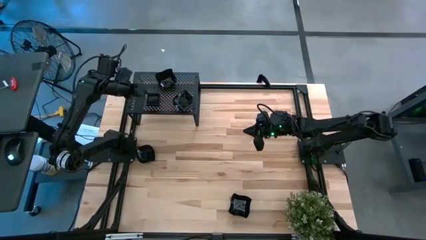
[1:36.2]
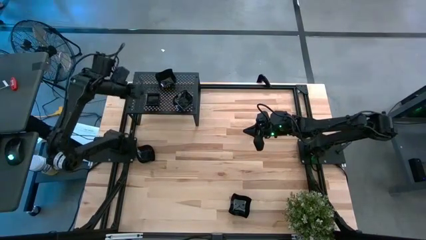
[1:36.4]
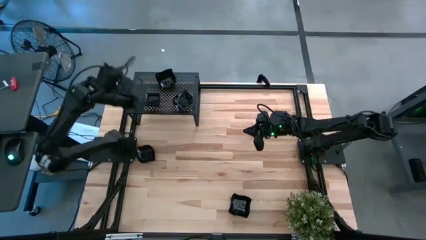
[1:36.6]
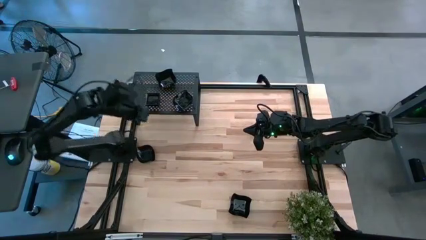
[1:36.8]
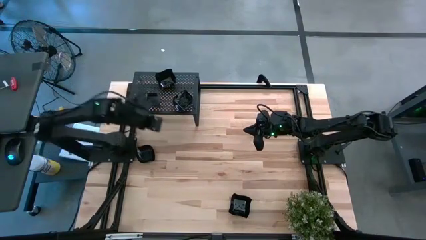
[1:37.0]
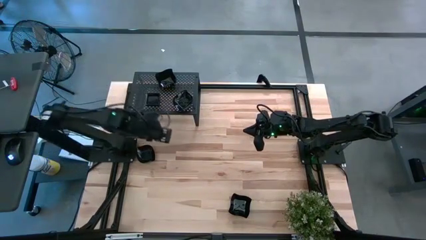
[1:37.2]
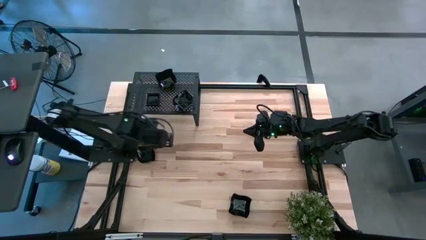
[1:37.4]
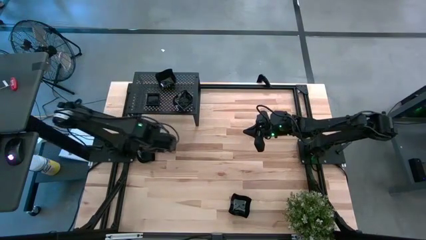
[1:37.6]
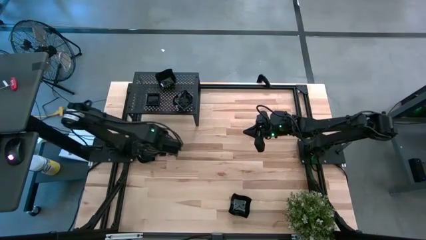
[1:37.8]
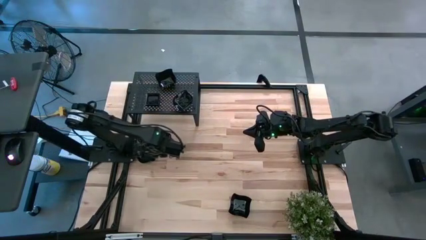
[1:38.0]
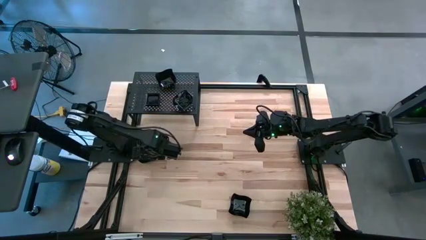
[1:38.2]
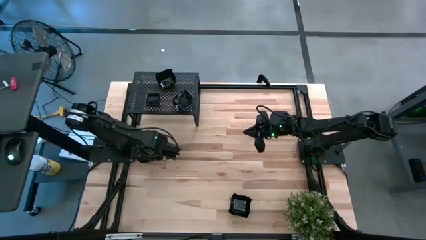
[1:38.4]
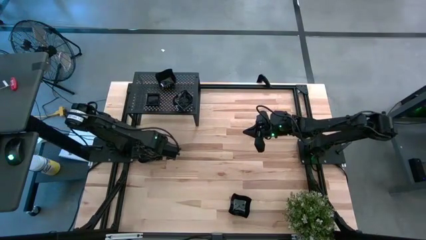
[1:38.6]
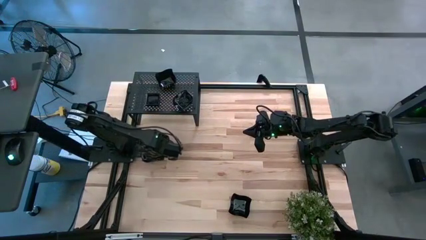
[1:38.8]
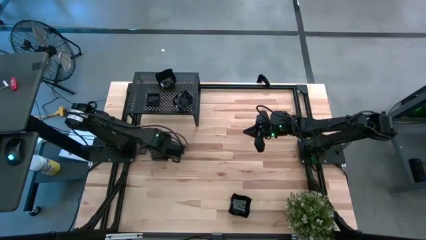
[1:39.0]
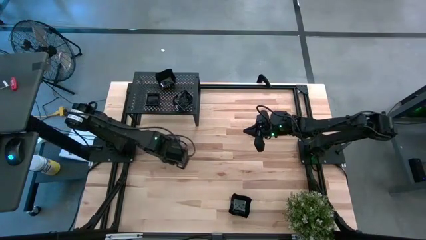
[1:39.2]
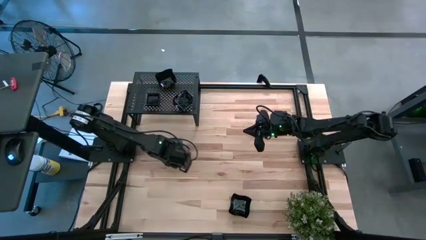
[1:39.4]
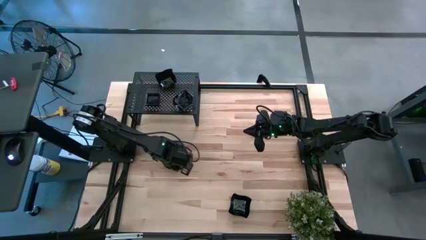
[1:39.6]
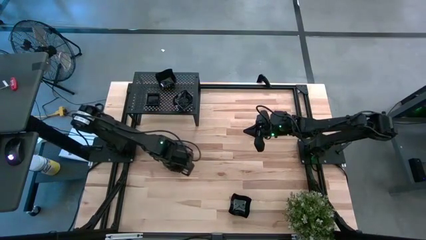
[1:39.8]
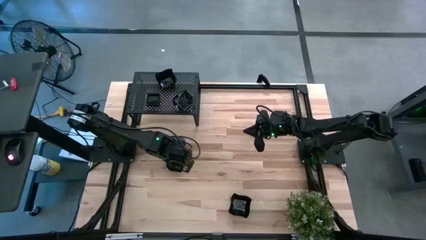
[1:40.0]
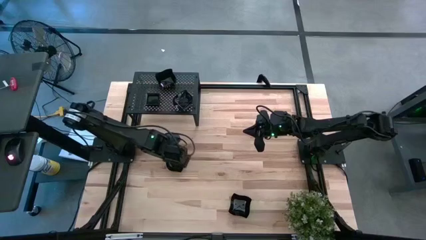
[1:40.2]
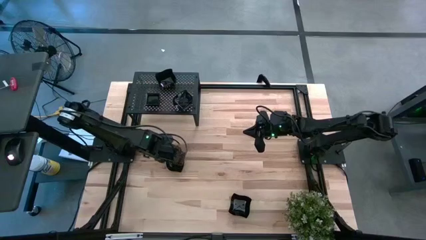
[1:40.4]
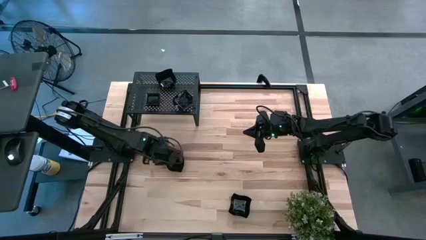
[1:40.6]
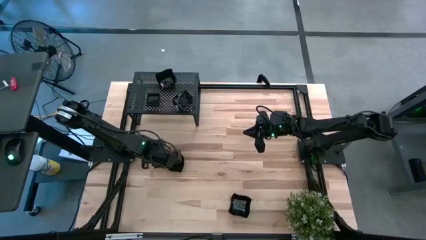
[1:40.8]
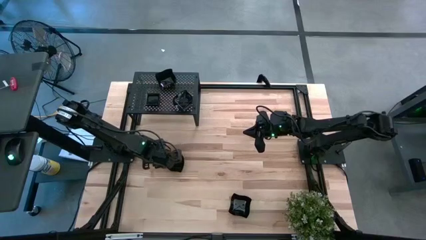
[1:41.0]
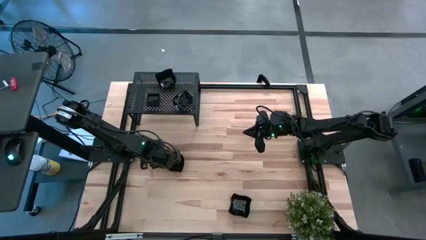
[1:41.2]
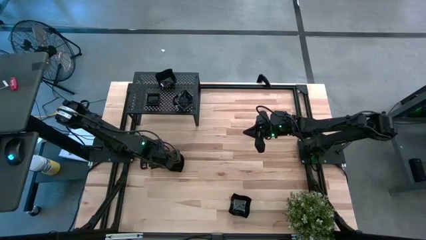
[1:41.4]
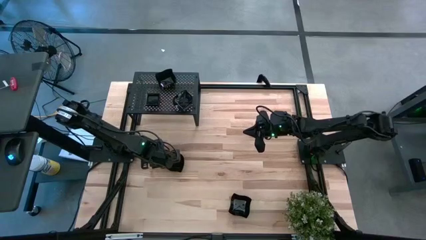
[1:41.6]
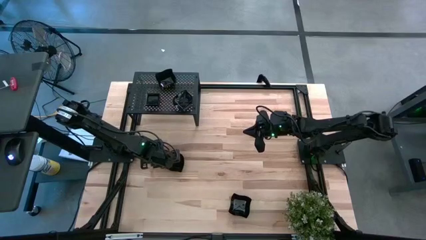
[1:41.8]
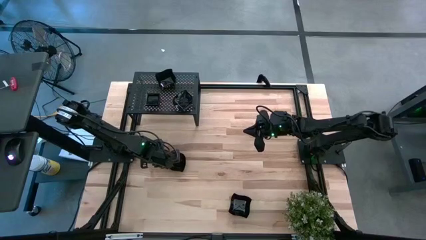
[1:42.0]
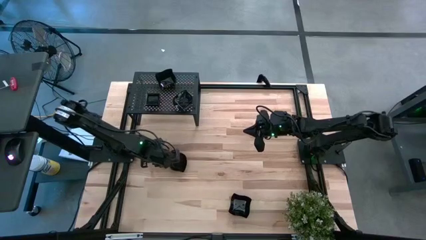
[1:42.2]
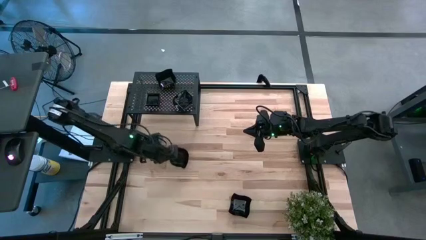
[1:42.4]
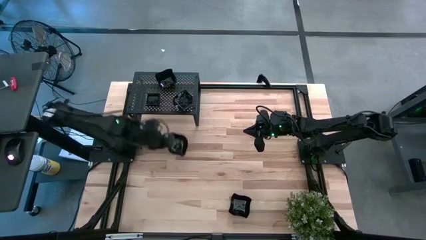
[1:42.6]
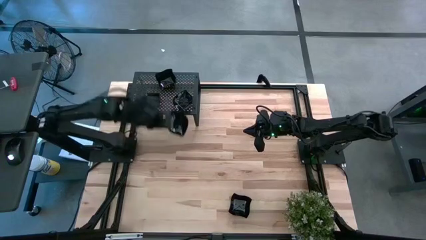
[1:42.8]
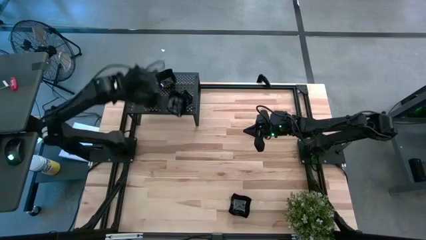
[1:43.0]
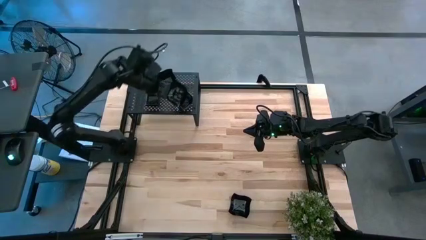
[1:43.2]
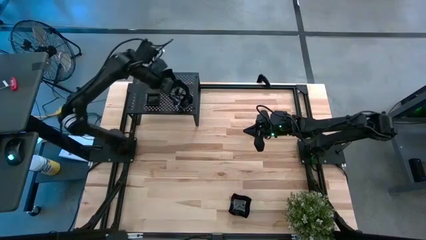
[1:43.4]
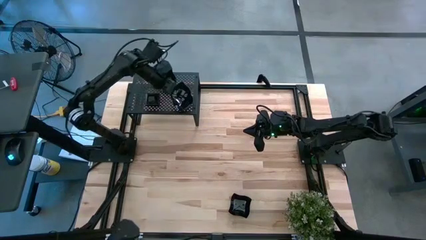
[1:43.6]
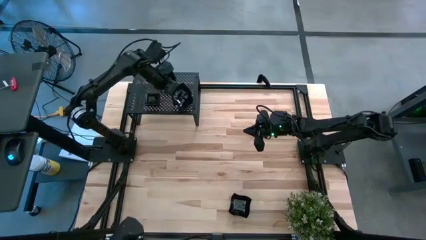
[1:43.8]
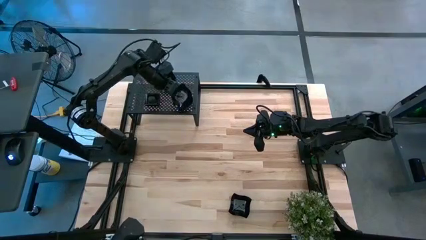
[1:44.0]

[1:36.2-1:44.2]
Task: Pick & Place Mini shaped plates
Stack the black leaf shaped plate on the other black leaf shaped plate on the shelf

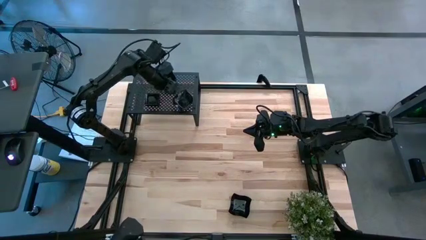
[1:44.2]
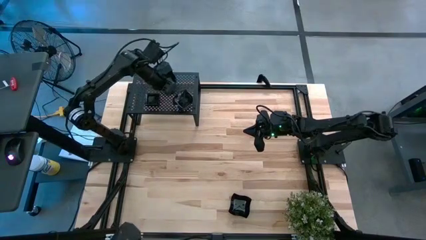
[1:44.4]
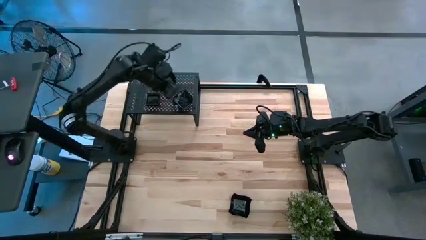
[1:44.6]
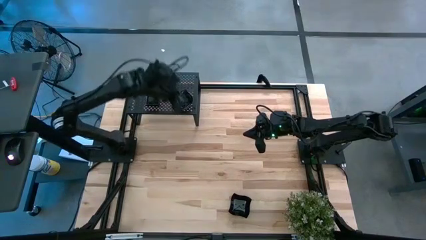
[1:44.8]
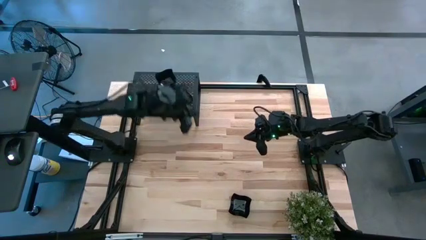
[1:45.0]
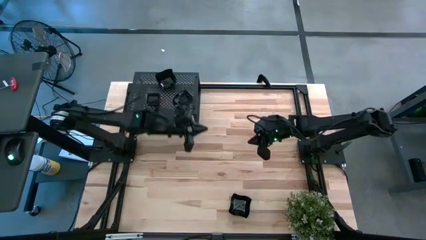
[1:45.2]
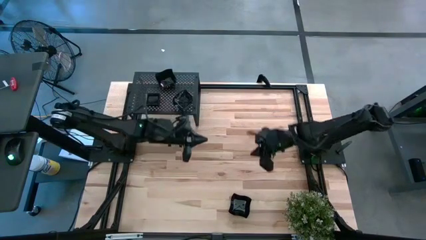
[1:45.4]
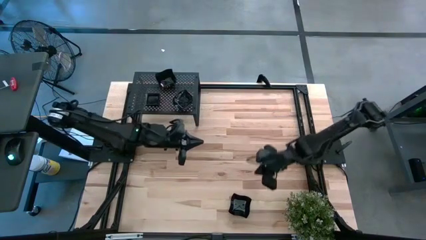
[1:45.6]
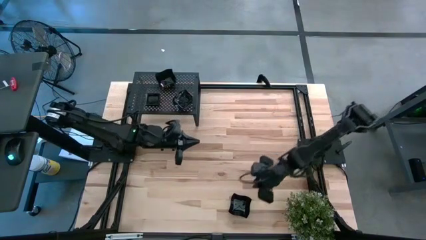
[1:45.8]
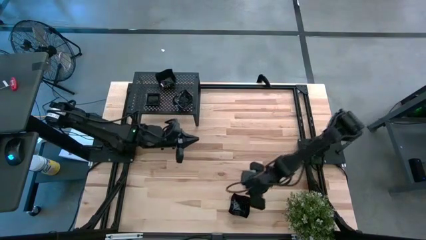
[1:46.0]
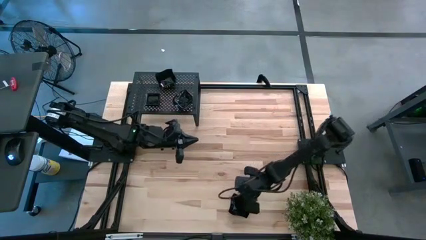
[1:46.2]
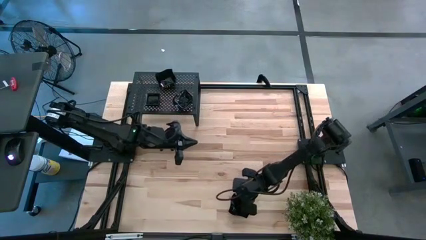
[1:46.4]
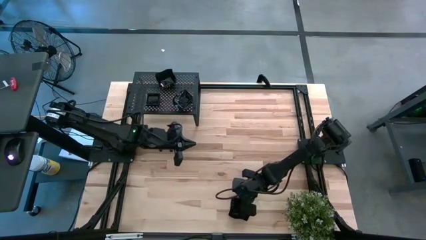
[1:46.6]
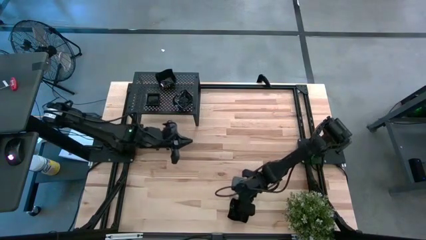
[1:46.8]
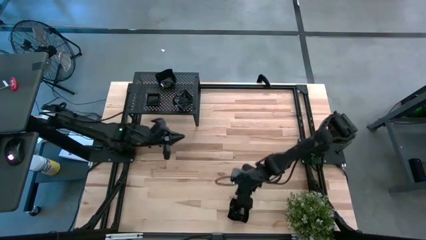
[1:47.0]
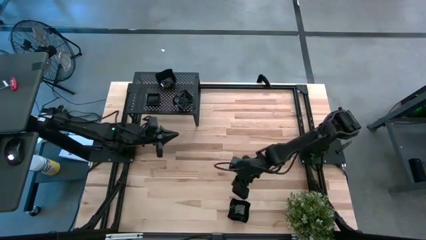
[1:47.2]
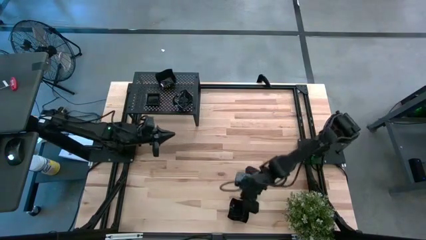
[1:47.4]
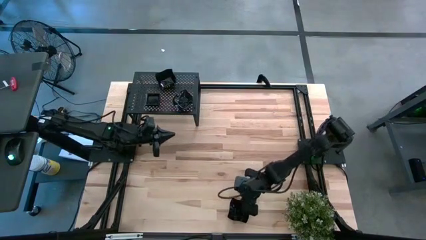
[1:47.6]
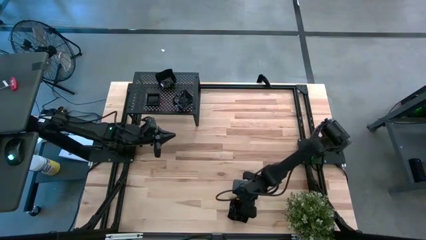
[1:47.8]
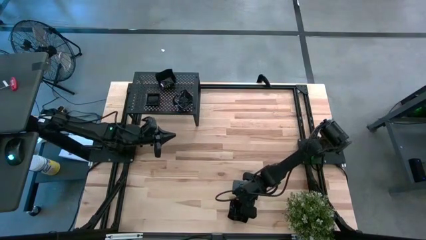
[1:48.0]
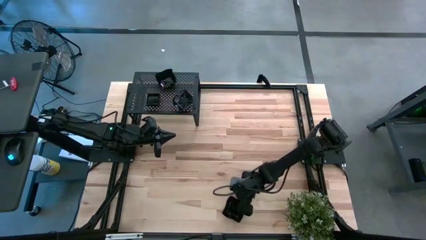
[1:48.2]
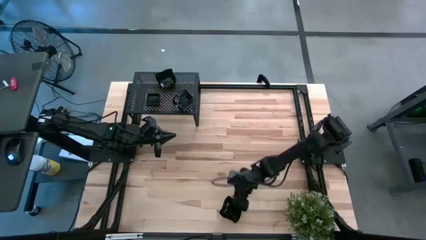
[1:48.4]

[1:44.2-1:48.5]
Stack the black distorted square plate on the other black distorted square plate on the shelf

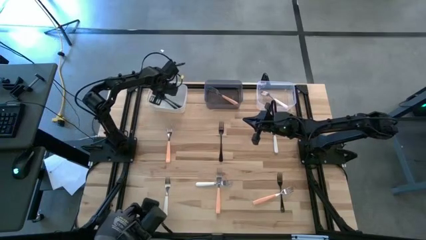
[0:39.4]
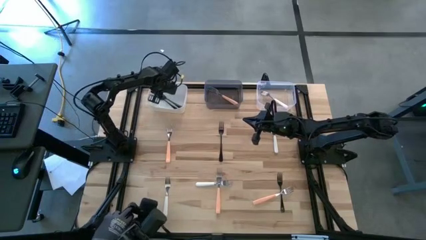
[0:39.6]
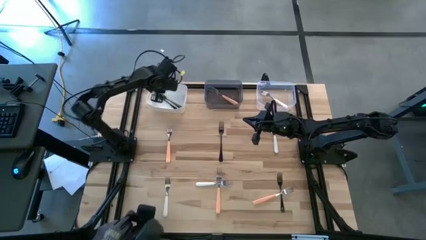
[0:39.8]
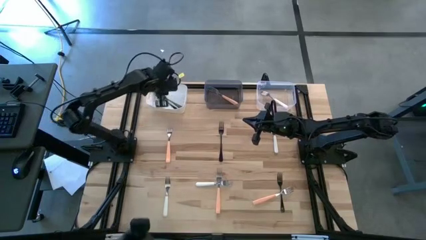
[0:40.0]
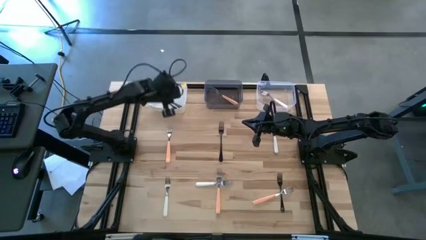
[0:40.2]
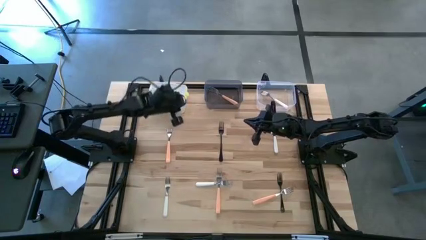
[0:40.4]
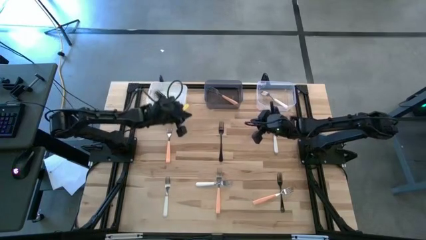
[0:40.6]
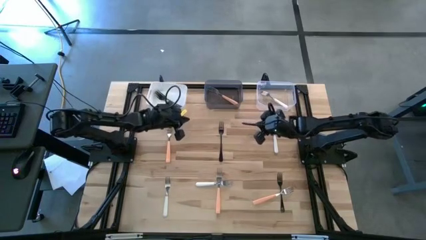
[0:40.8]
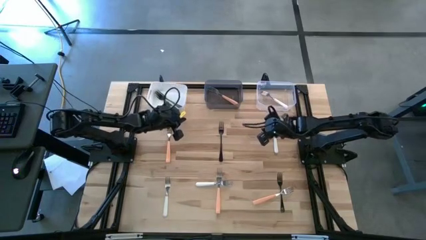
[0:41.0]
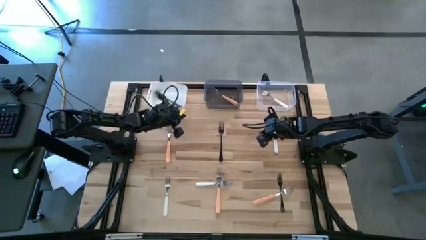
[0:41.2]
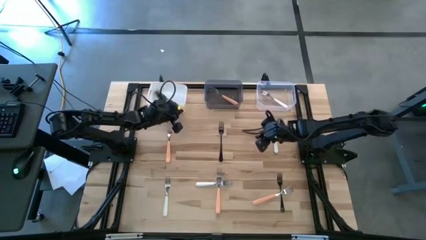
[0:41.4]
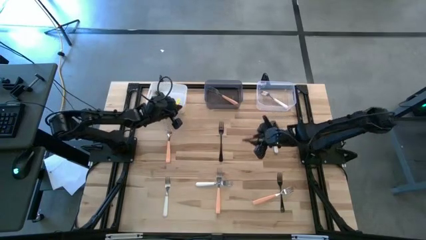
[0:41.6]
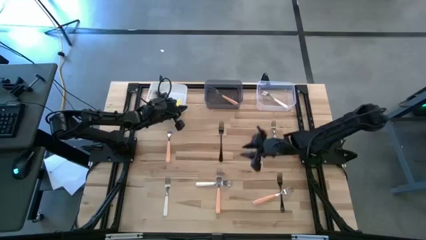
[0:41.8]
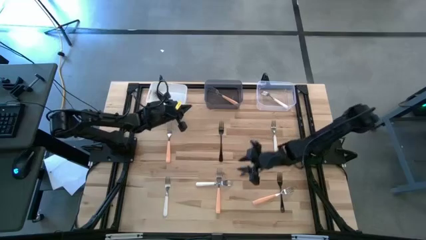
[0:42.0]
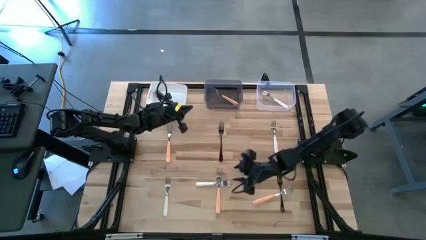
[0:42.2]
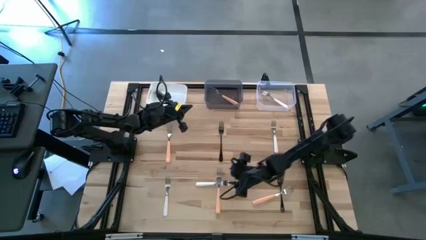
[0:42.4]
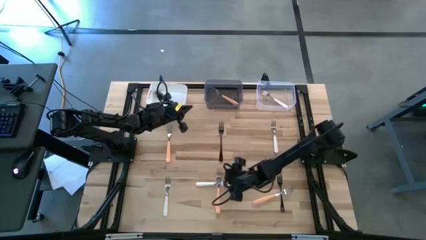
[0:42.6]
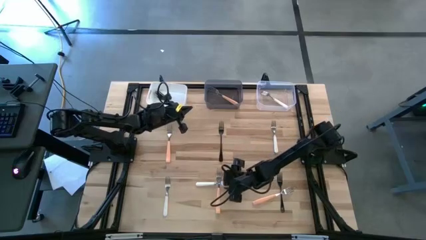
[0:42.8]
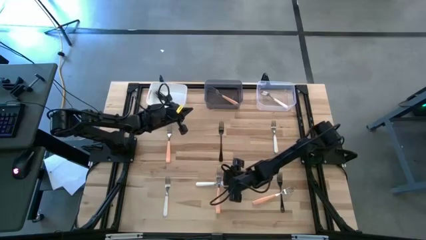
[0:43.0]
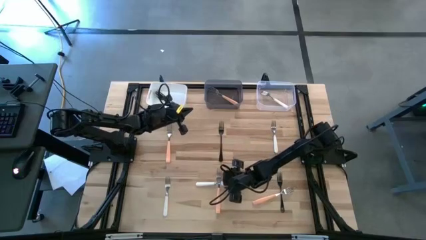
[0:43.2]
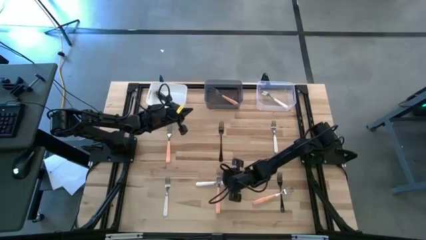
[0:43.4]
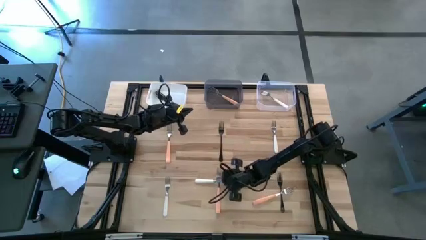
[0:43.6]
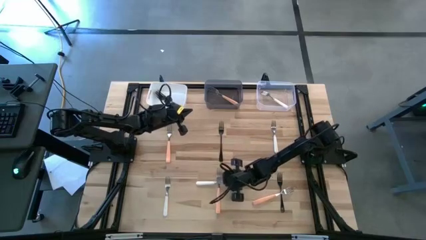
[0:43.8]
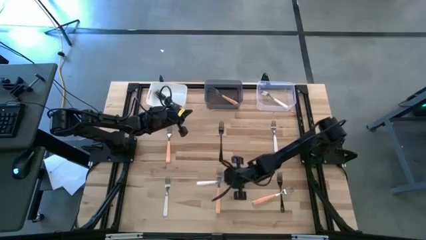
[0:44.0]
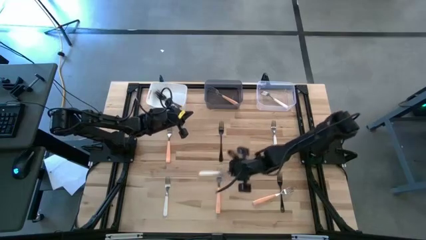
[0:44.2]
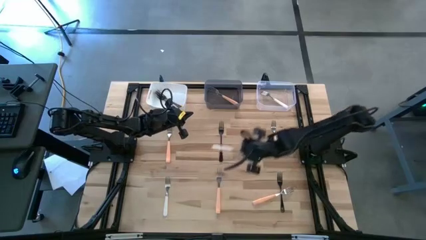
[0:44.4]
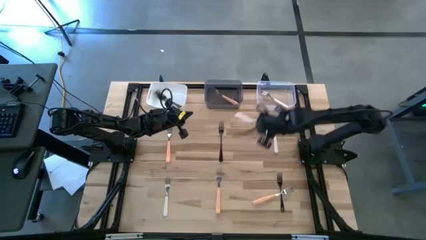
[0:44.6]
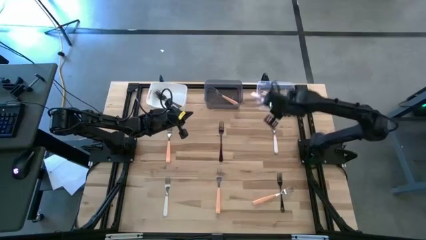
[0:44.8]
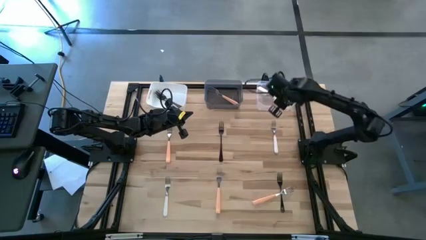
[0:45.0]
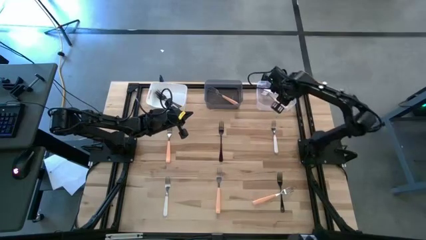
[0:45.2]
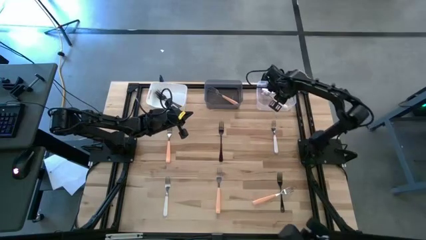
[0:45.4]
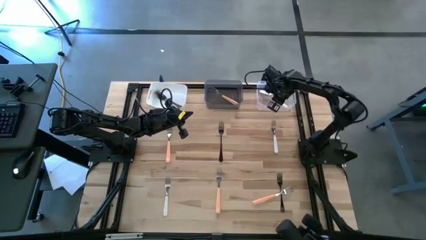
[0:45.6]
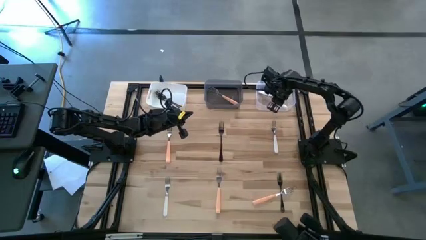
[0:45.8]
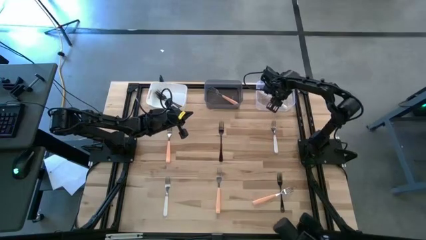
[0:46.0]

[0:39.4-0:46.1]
Task: Sort silverware by color (type)
Put the bottom right white fork into the transparent bin
